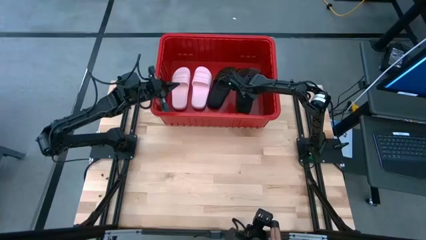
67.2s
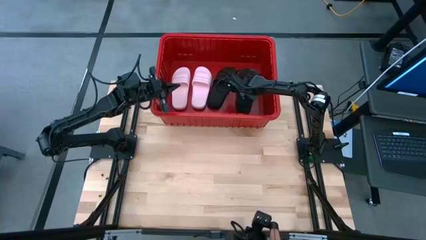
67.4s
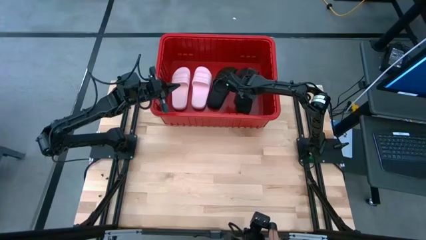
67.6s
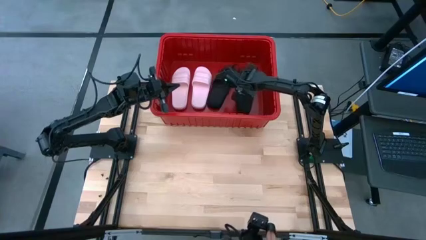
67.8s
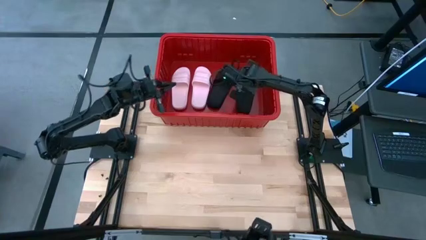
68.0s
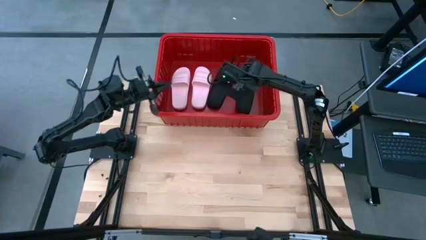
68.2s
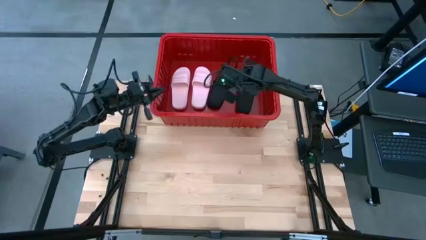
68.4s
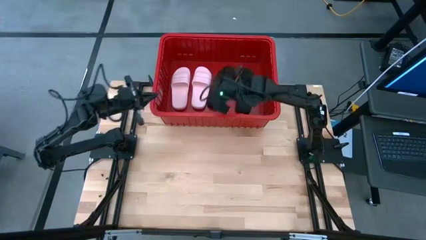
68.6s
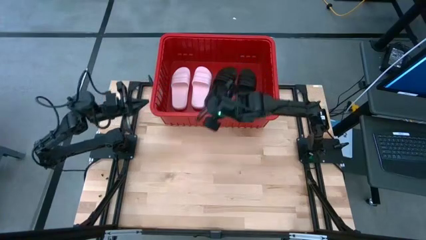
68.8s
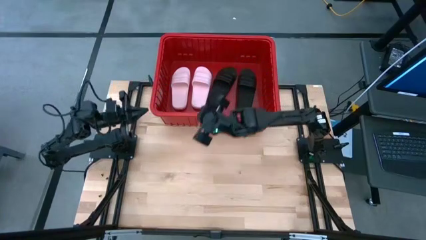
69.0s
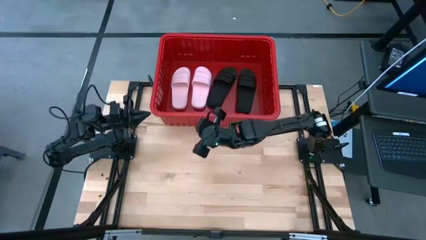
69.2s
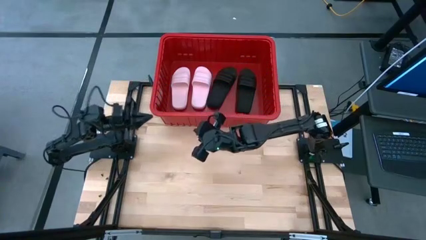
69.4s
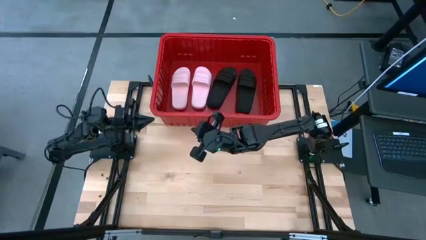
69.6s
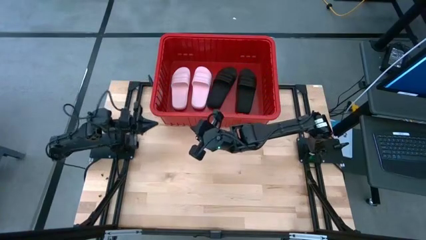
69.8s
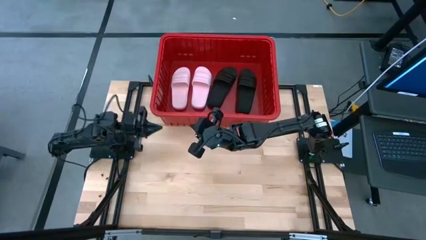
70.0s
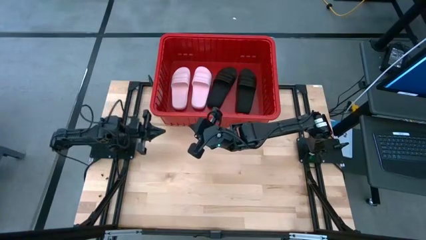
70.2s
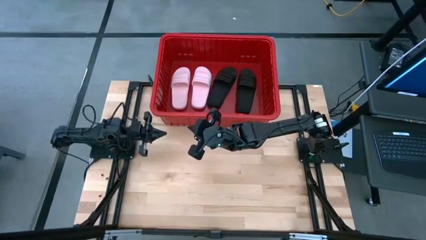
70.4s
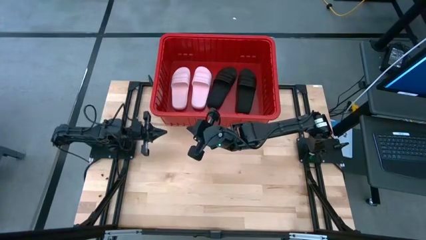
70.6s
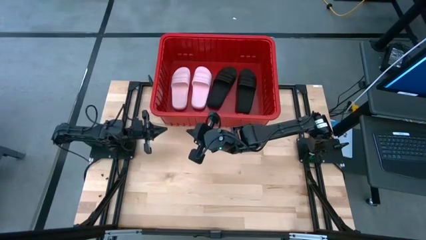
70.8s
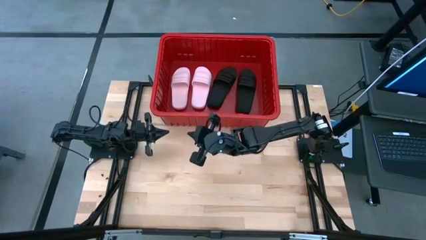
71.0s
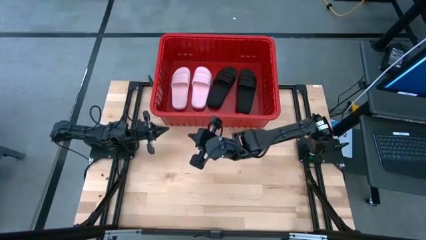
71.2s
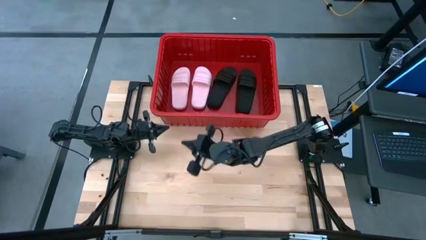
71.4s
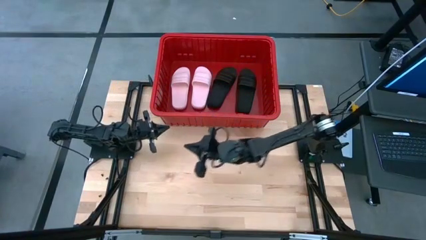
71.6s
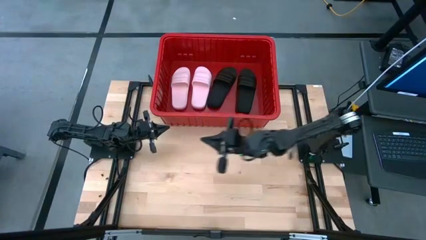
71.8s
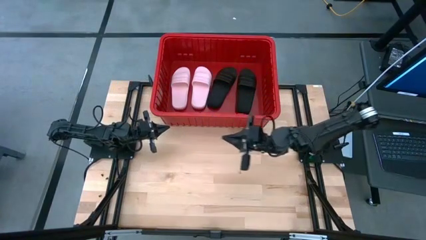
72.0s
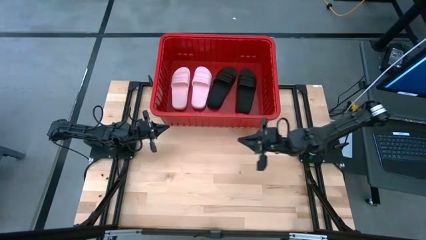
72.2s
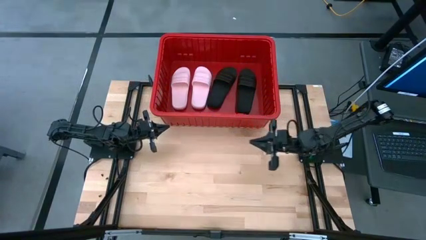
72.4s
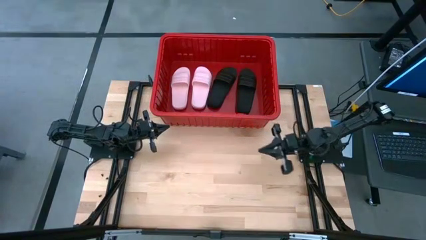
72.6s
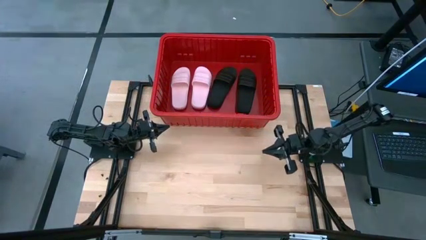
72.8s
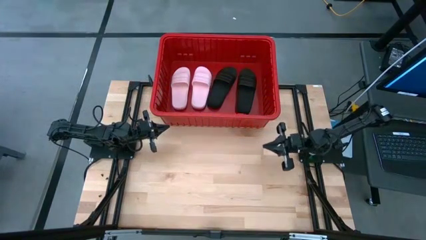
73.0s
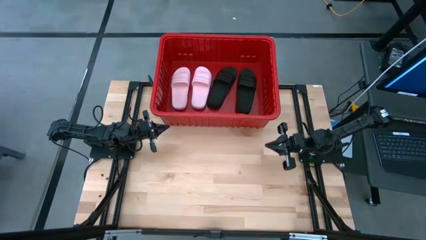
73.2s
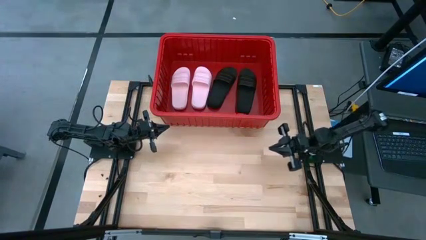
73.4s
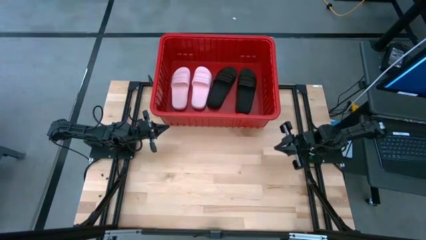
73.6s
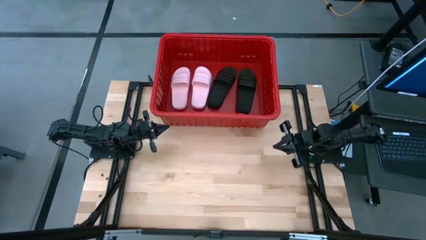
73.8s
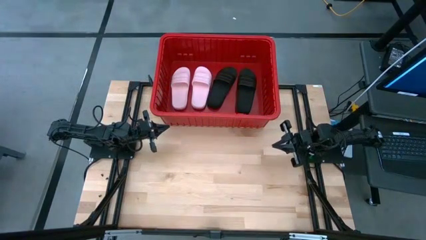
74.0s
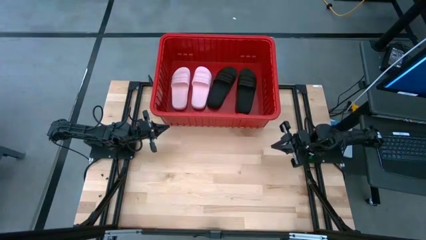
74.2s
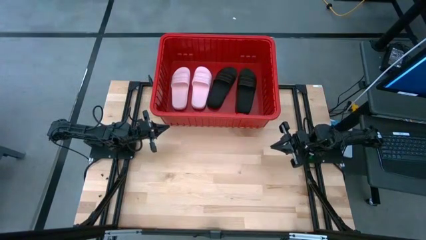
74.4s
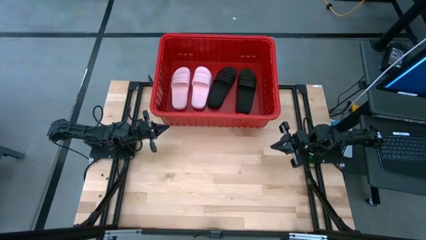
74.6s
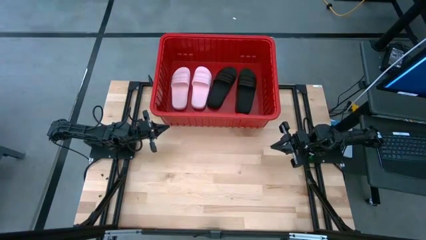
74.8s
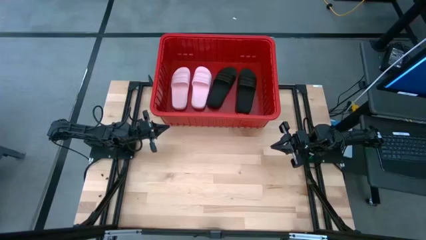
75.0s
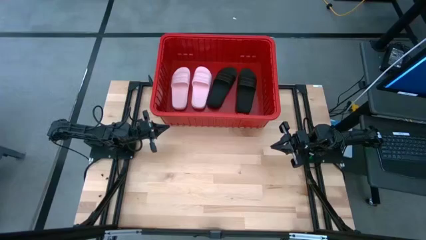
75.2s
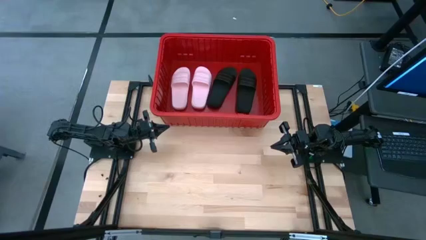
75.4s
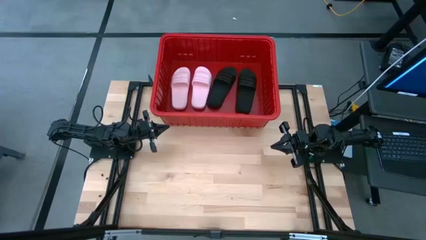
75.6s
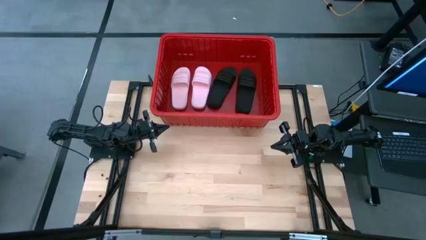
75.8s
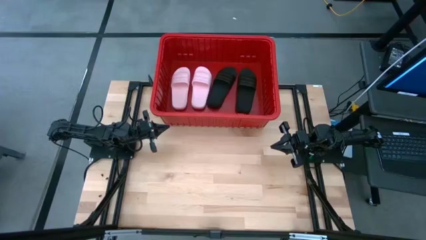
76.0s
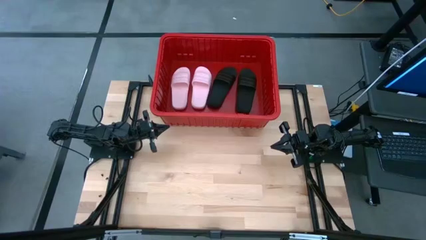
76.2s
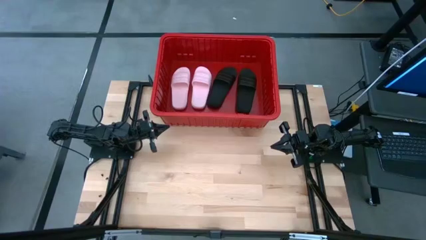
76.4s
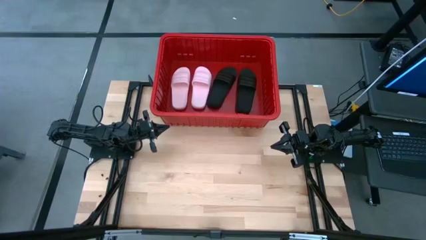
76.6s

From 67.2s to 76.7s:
Task: Pick and place slides into bin
Return to Home Position

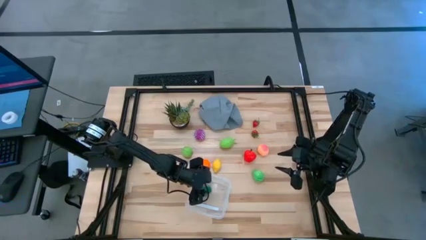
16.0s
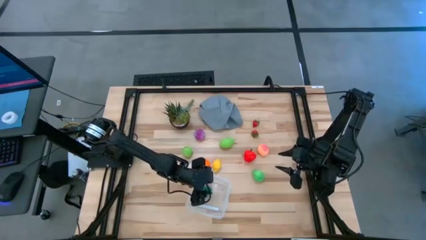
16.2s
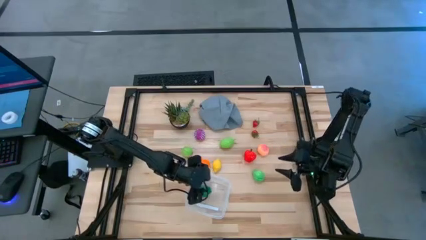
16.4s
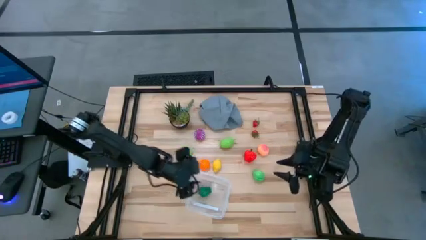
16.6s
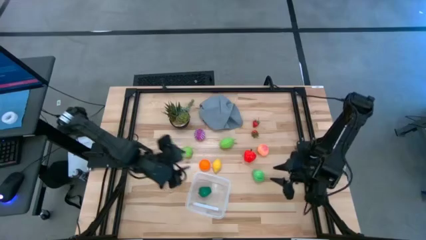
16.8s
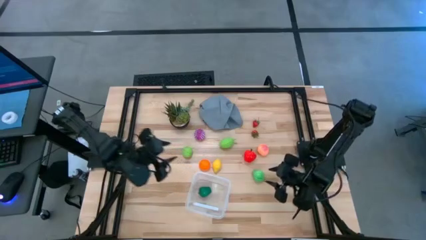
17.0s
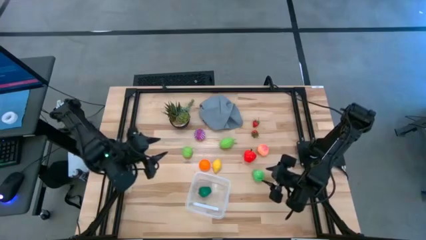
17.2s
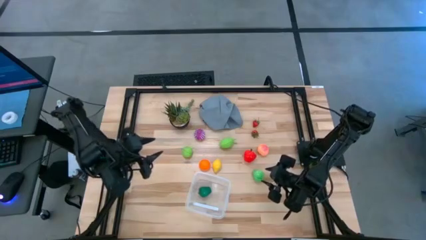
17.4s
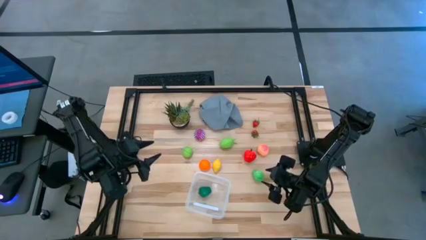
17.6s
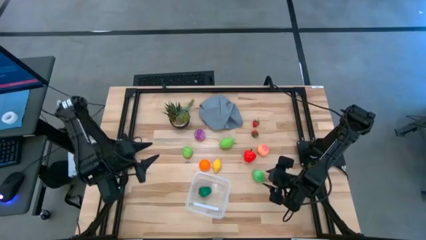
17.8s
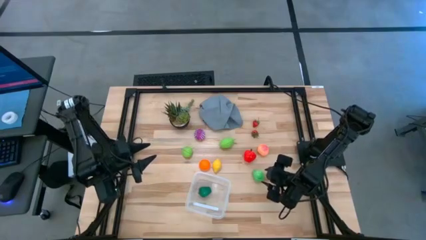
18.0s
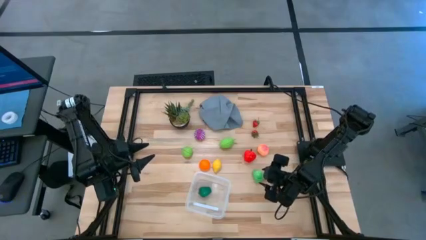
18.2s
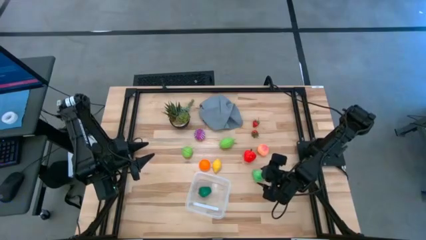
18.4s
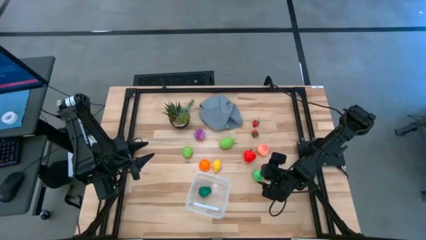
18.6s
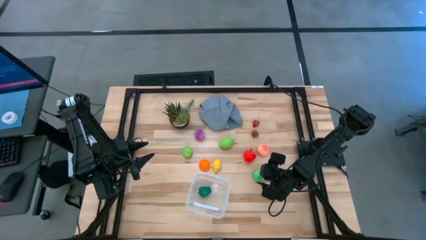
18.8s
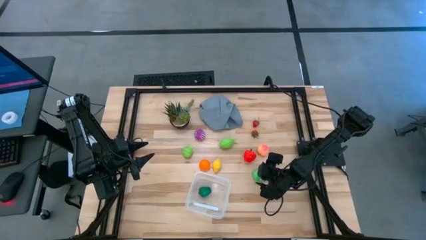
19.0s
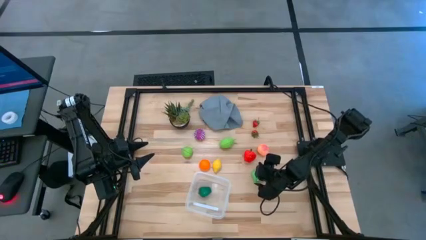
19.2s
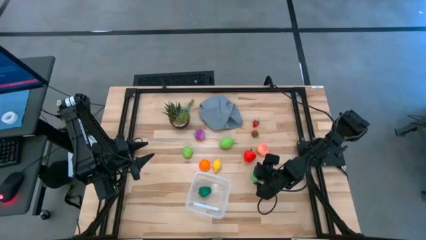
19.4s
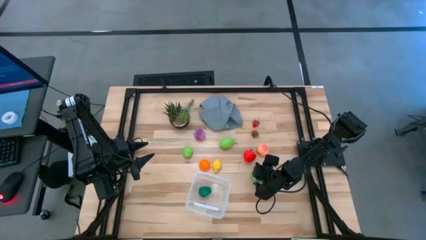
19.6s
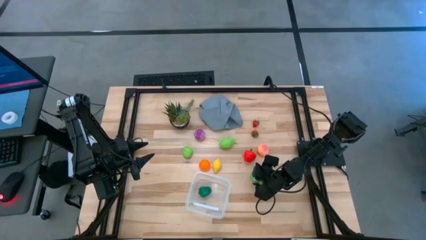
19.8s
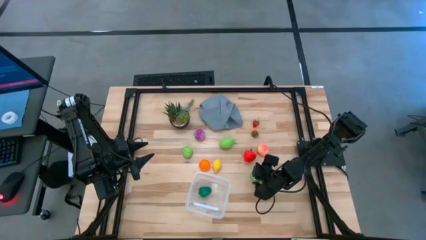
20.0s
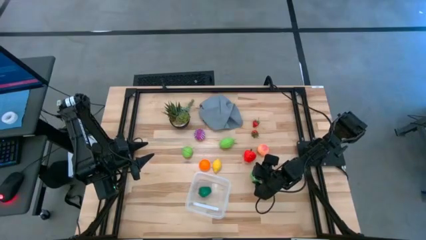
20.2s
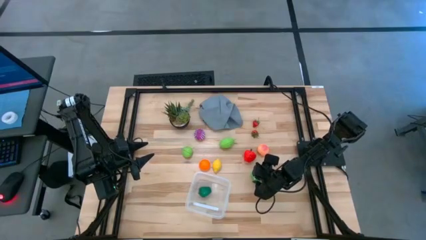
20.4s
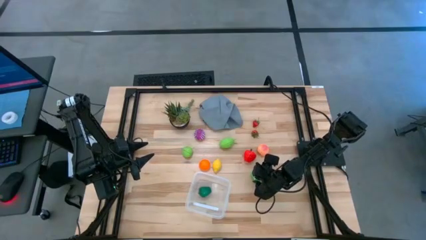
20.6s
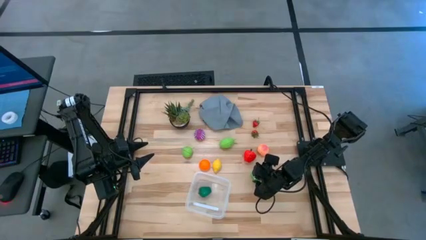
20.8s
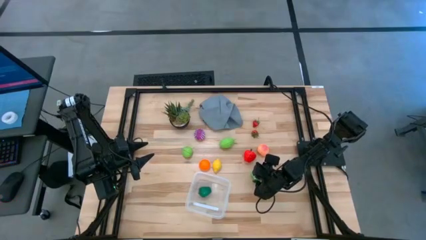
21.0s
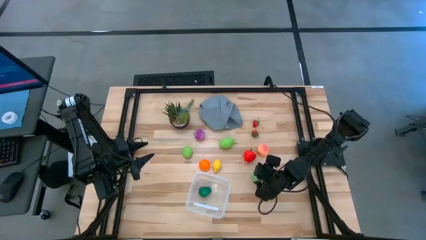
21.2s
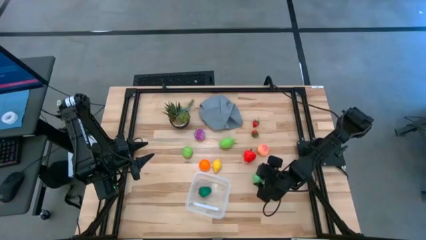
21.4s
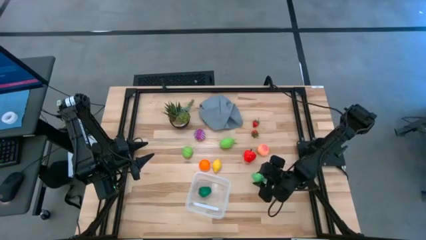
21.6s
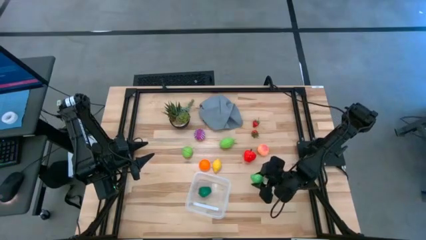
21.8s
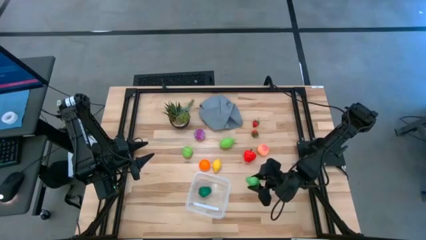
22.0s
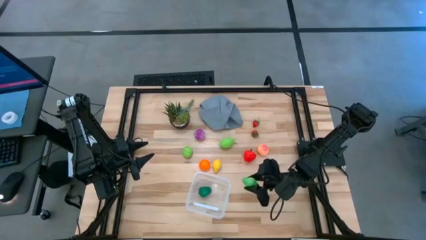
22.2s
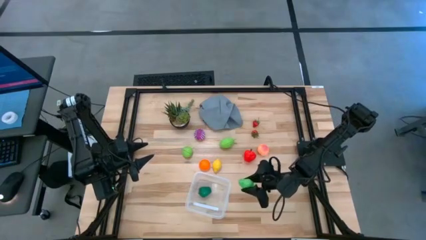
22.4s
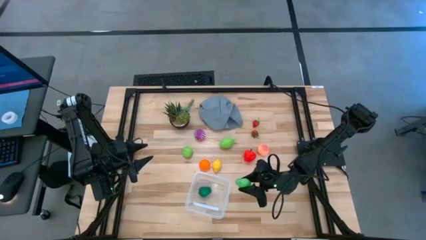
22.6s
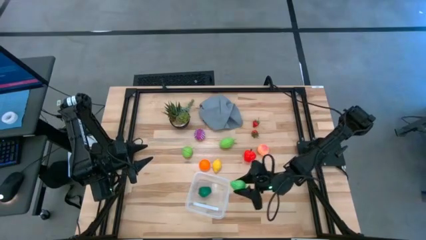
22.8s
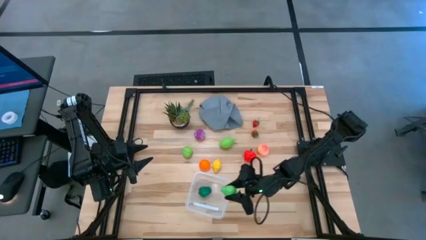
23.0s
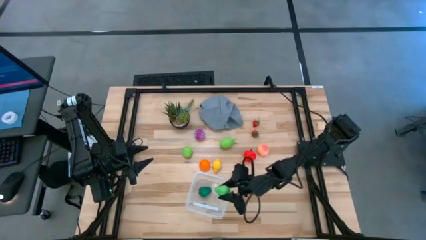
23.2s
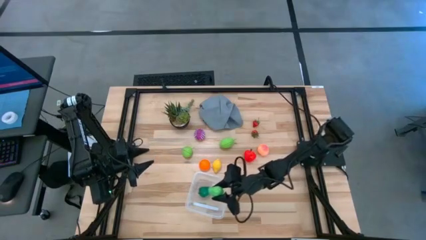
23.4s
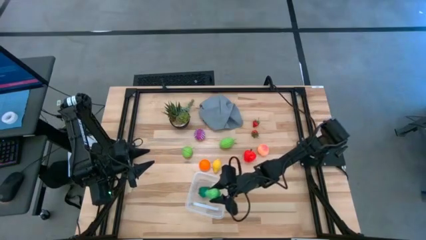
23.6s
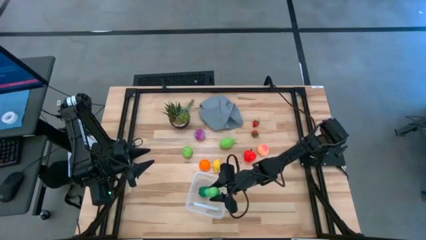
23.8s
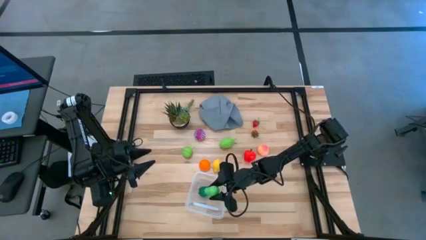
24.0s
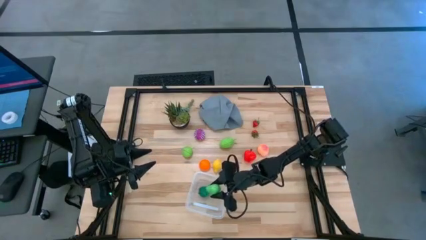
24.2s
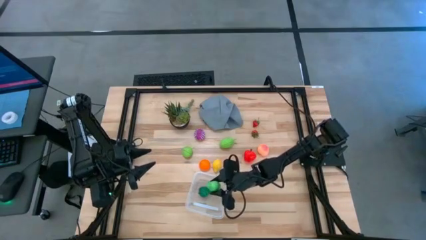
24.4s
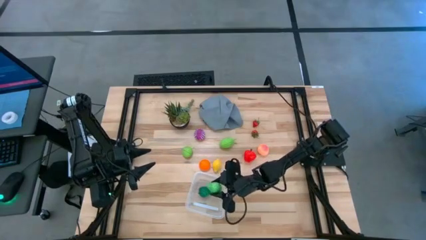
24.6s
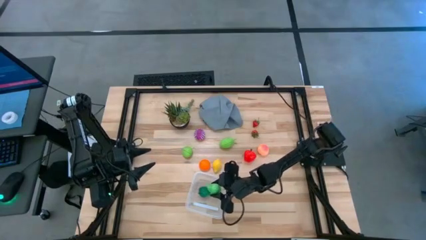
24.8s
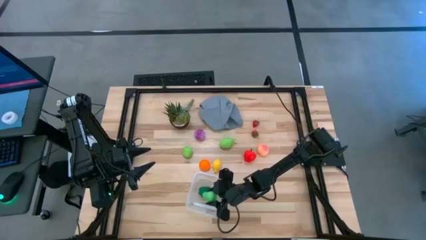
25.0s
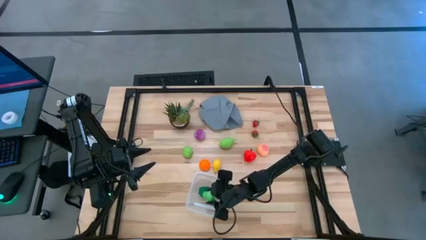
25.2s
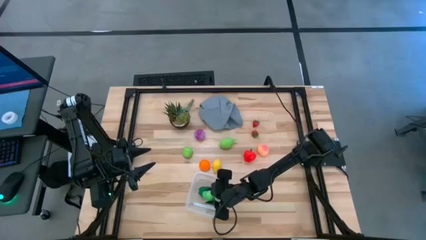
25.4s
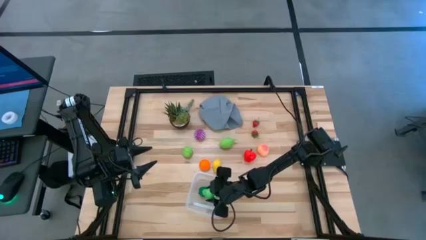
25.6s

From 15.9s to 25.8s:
Task: Pick and placing Produce into tupperware
Put the avocado into the transparent bin
